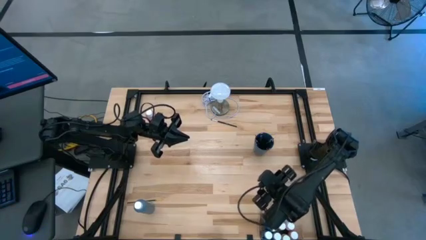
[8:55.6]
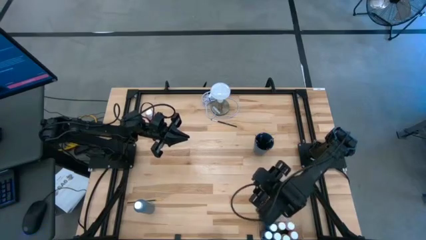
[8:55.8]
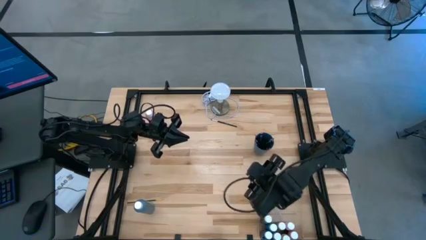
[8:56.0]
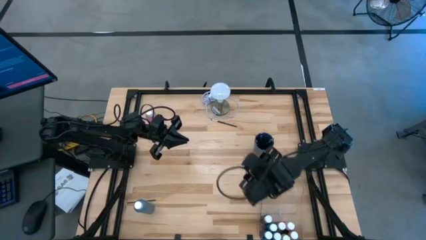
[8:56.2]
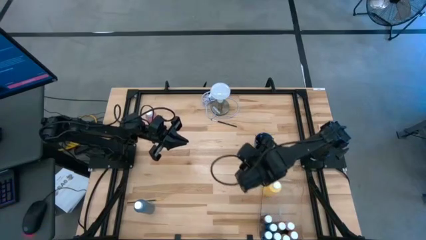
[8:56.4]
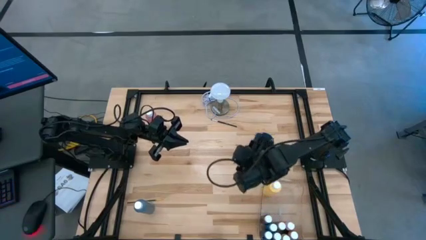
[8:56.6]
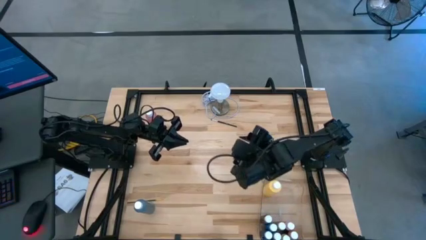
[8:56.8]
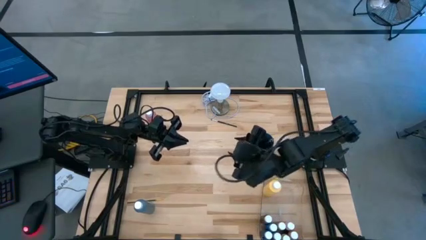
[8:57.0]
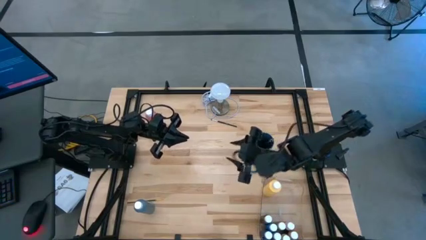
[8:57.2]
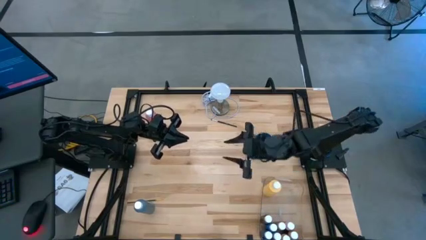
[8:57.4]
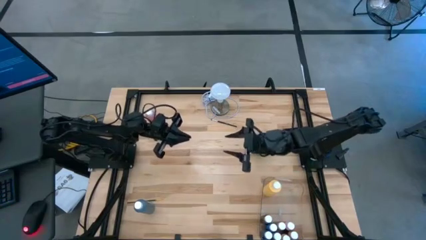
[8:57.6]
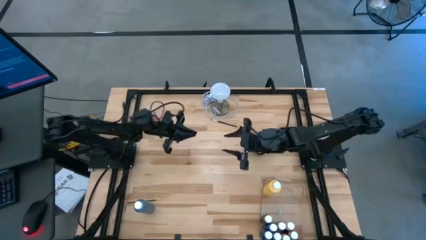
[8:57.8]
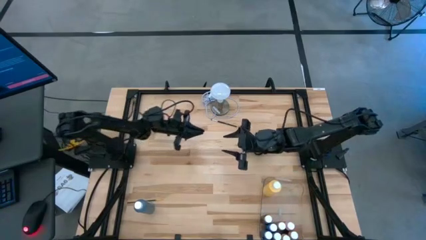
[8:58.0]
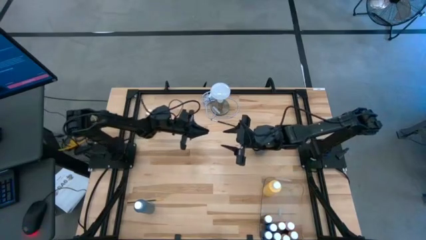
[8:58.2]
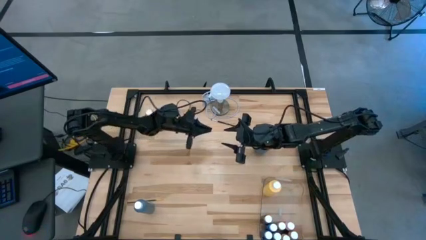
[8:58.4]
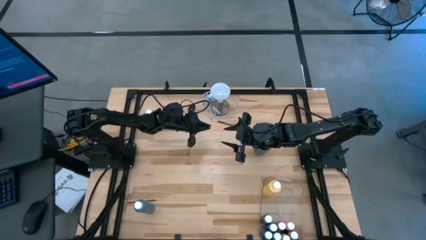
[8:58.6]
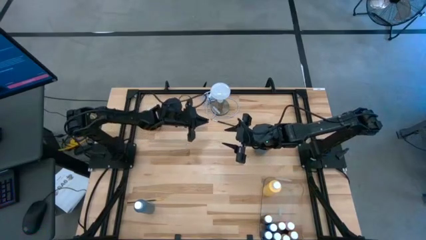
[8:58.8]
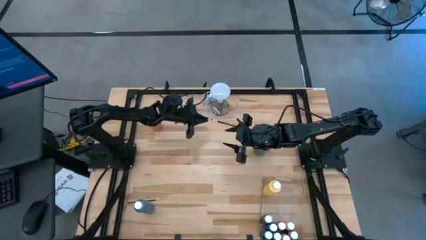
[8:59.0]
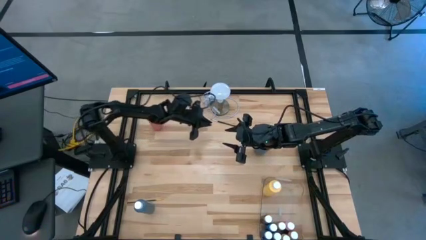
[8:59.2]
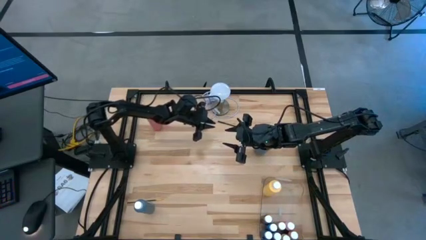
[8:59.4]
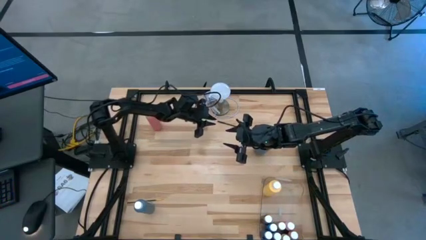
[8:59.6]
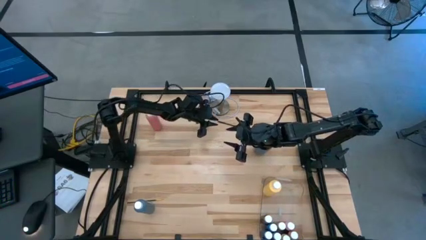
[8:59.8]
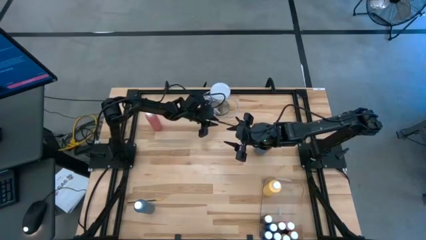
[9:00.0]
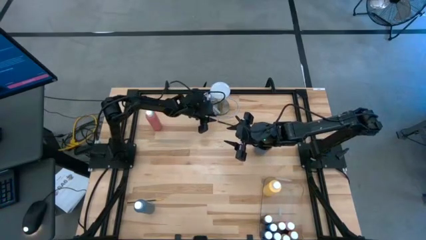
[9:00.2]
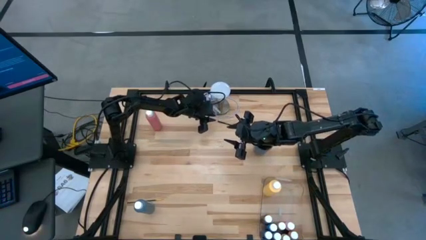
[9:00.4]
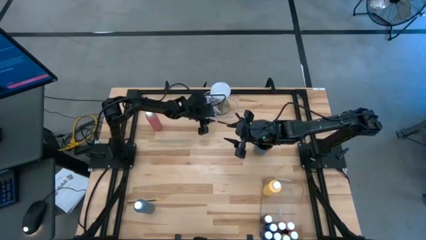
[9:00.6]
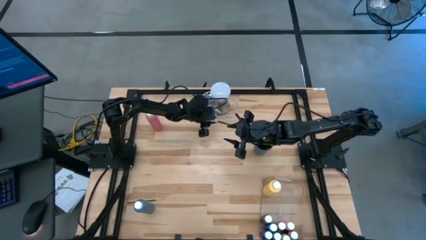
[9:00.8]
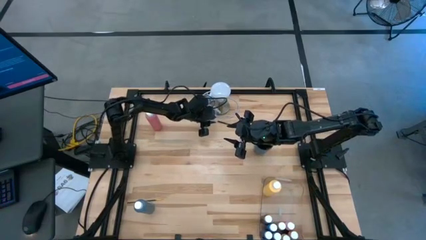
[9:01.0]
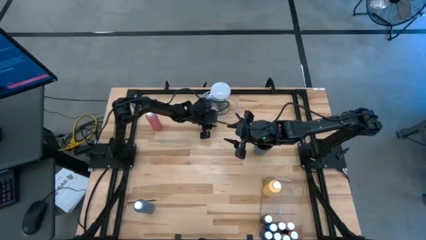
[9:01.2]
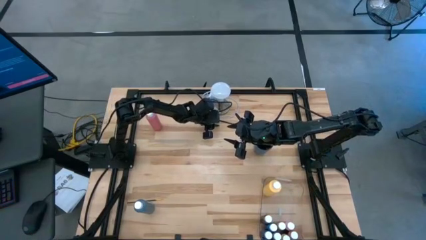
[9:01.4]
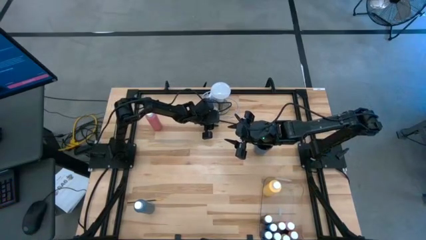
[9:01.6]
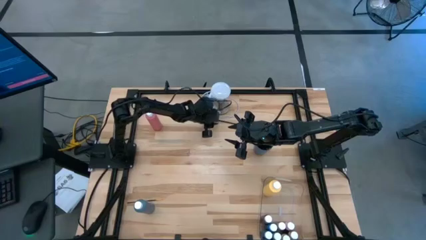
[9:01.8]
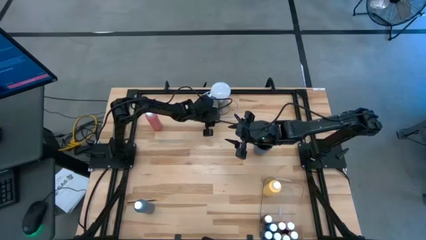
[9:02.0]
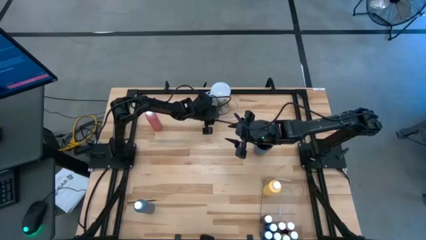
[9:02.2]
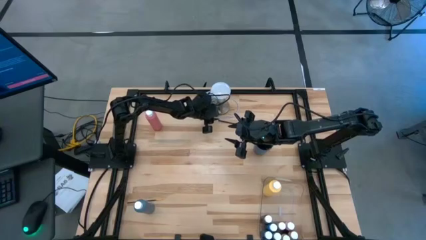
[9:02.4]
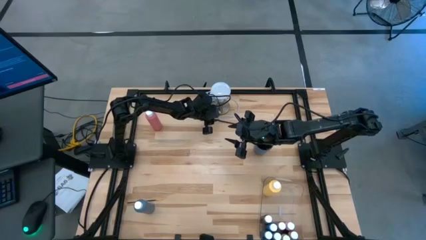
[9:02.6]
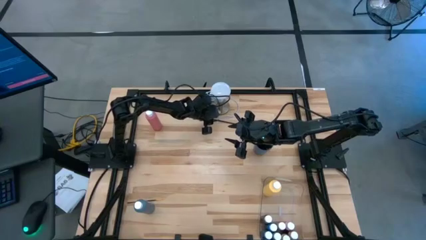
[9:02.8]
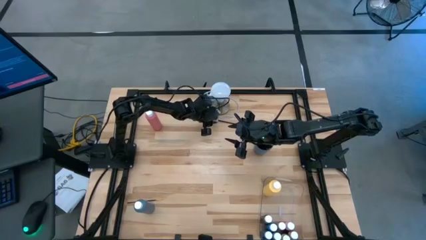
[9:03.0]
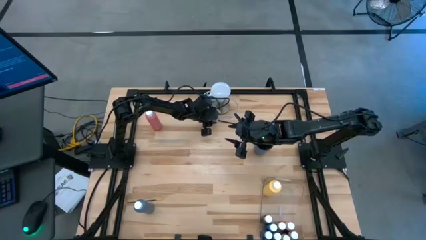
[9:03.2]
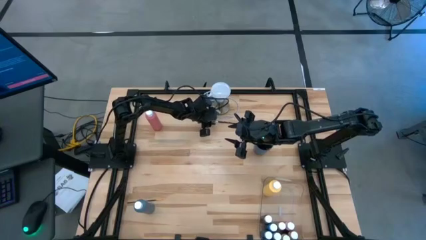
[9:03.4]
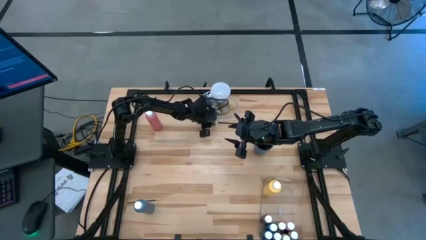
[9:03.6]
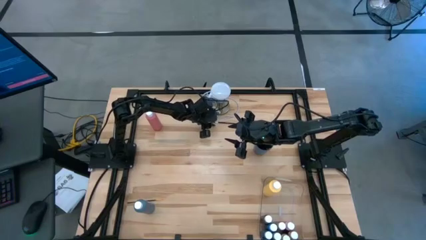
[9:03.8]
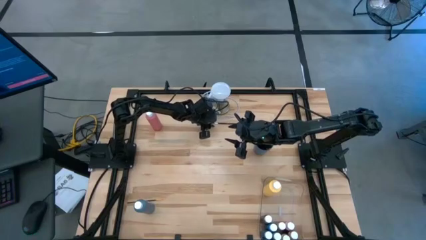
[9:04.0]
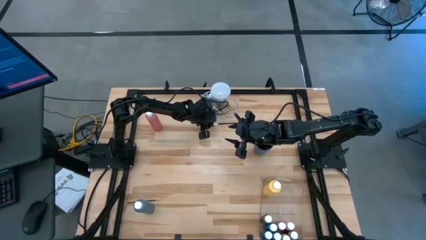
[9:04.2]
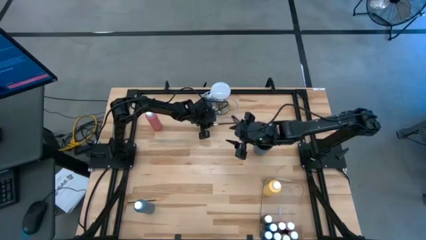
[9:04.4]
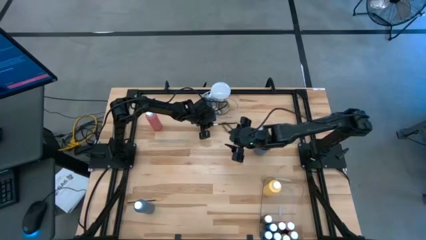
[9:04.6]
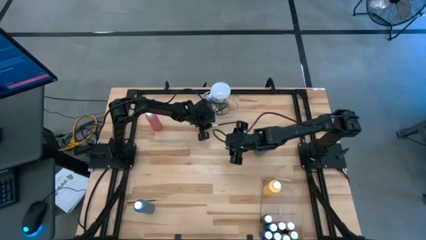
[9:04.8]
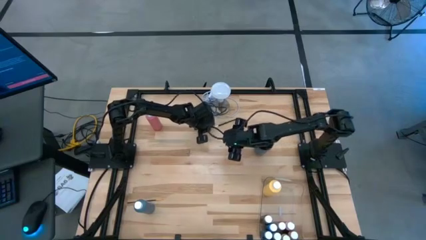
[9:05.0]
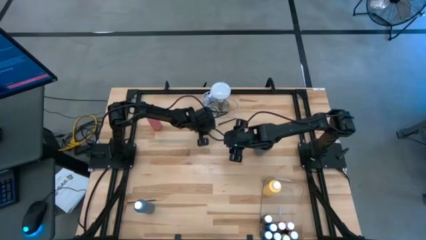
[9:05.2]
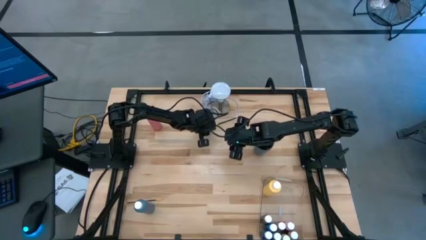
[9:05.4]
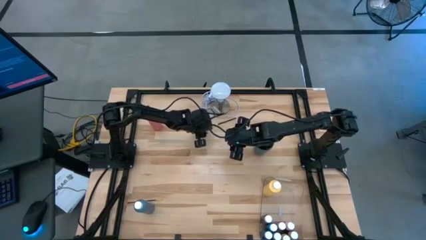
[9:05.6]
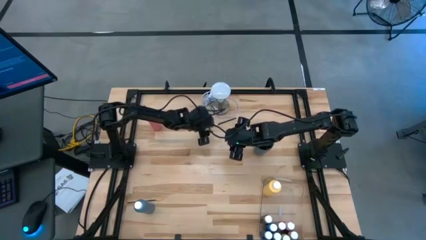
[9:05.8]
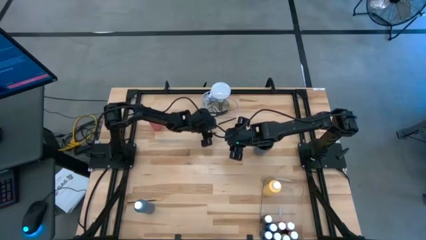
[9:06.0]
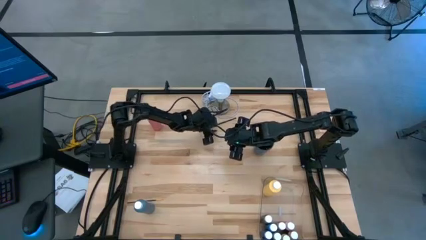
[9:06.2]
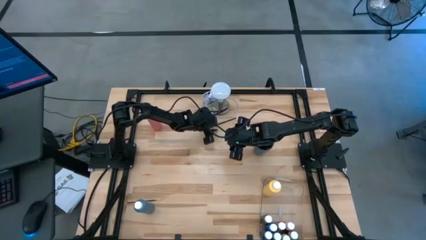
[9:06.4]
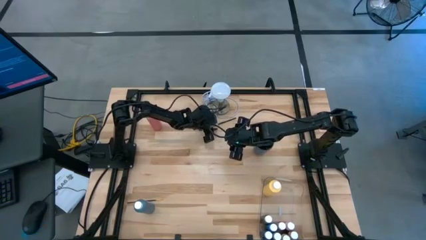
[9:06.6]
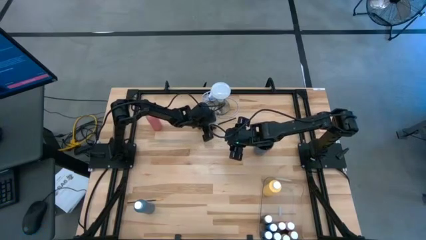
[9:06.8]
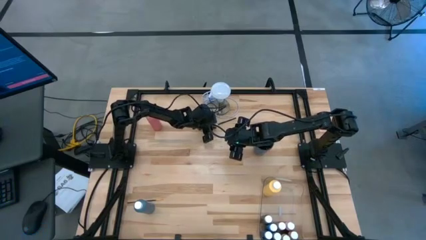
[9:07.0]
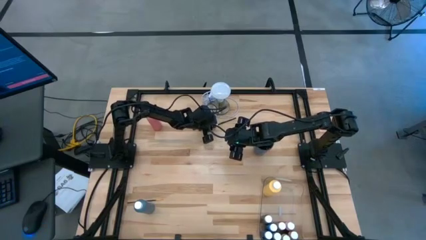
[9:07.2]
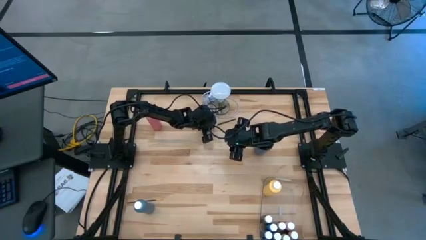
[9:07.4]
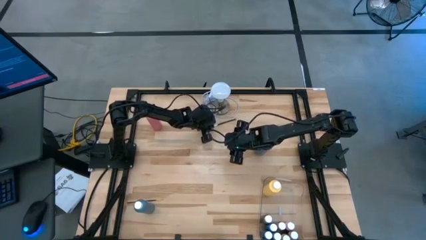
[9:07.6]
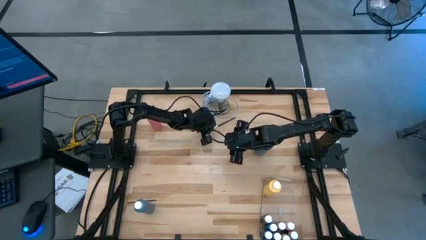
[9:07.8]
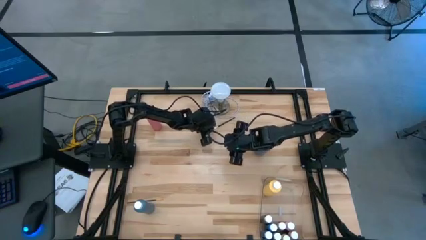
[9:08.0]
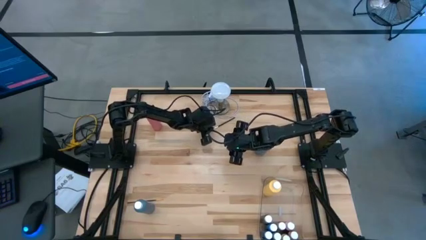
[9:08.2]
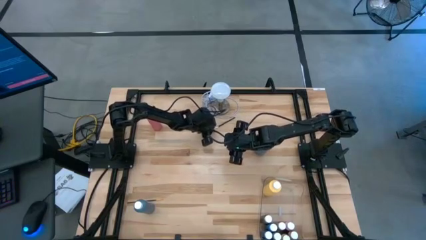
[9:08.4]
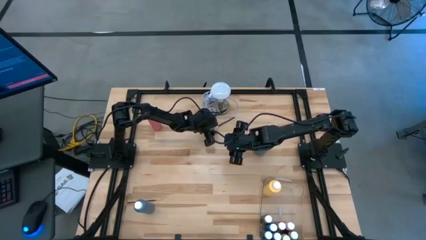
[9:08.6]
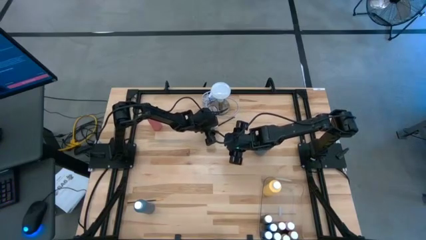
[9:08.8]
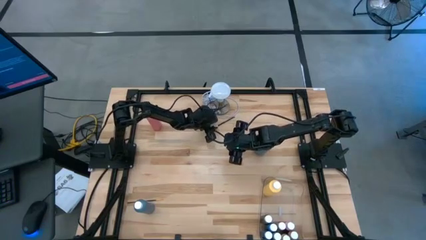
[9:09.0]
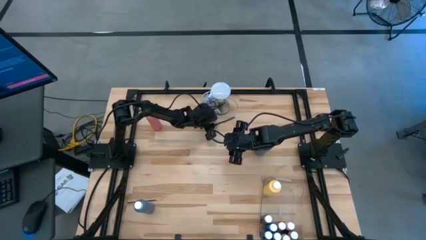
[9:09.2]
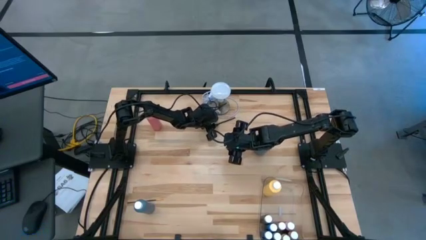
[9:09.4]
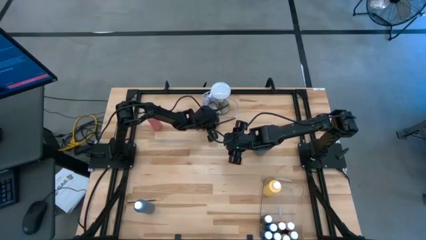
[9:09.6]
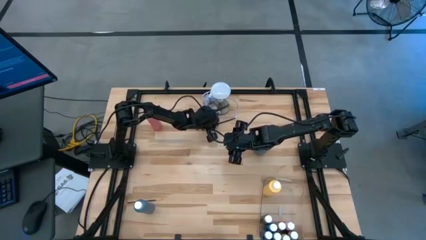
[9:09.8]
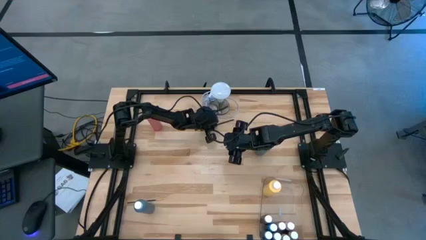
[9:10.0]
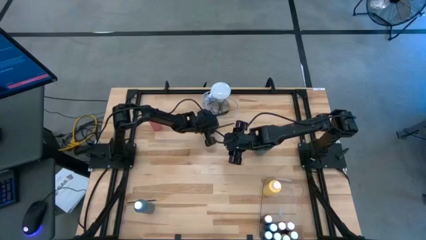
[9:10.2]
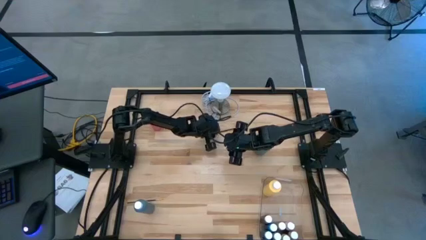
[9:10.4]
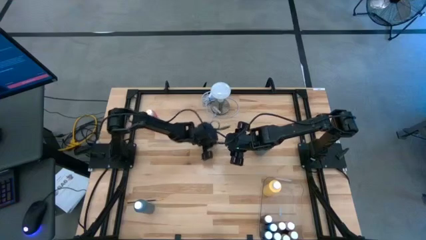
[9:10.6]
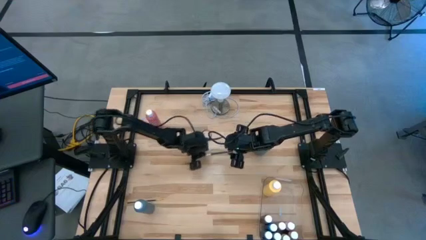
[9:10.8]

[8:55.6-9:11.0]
Task: Pick & Place Paint Supplies
Put the black silver paintbrush into the blue cup
